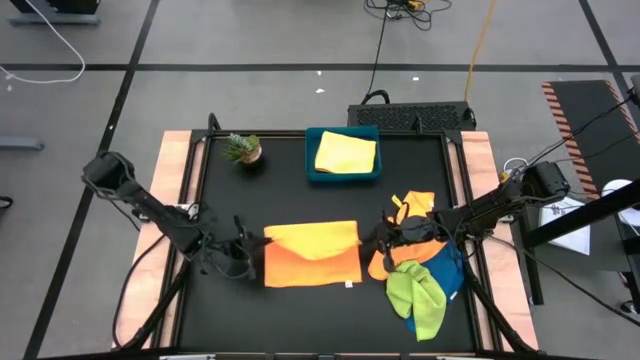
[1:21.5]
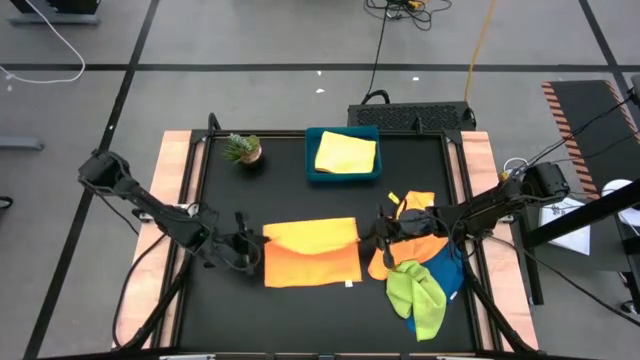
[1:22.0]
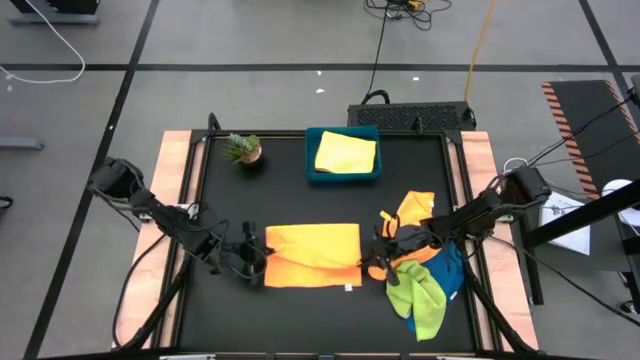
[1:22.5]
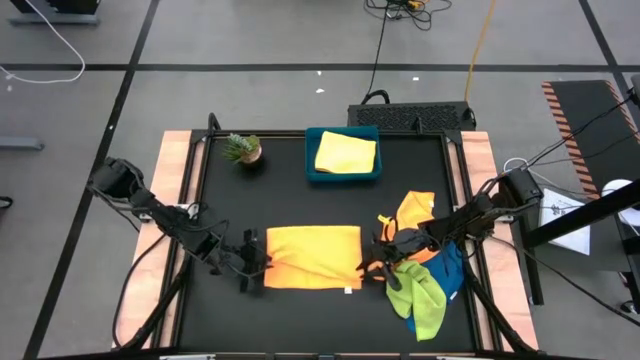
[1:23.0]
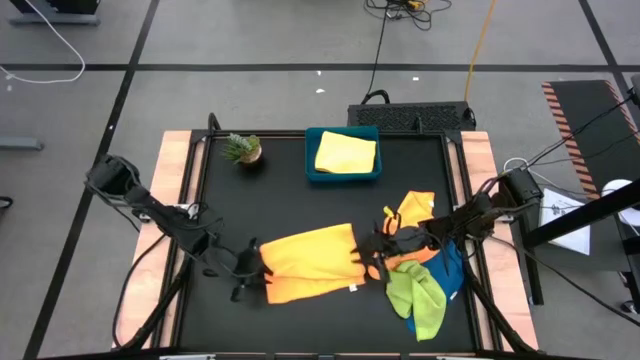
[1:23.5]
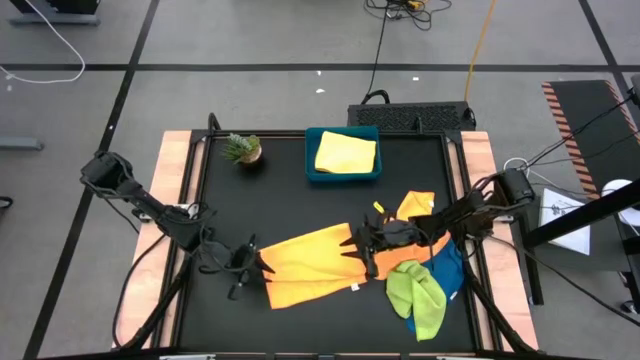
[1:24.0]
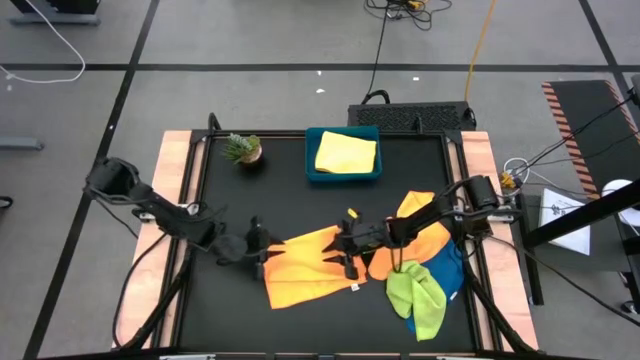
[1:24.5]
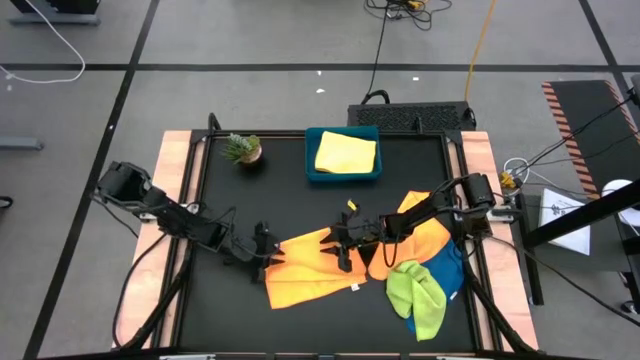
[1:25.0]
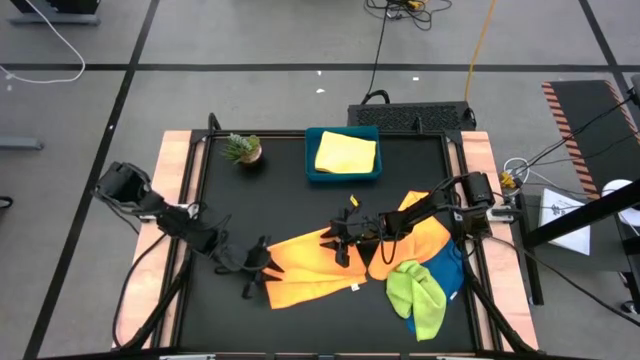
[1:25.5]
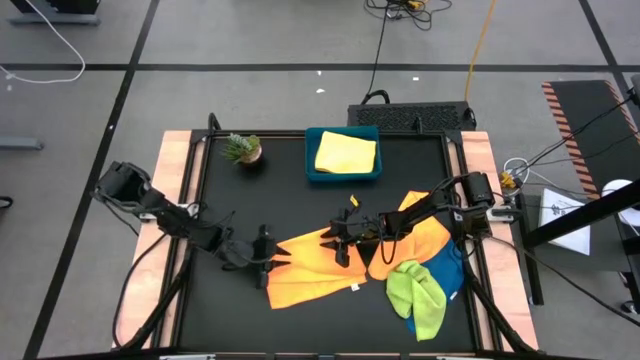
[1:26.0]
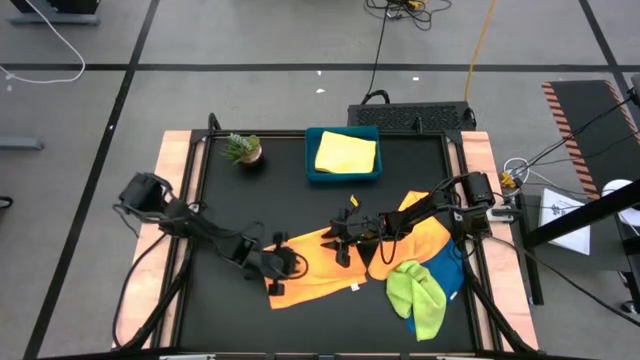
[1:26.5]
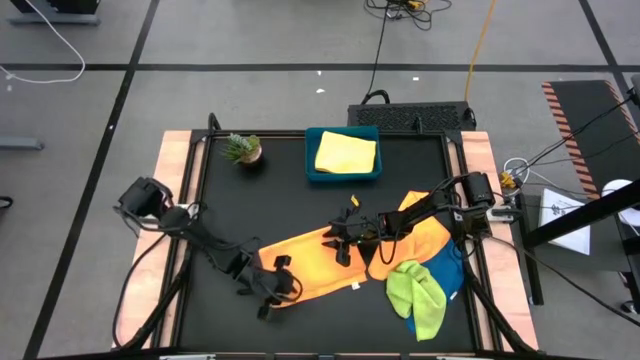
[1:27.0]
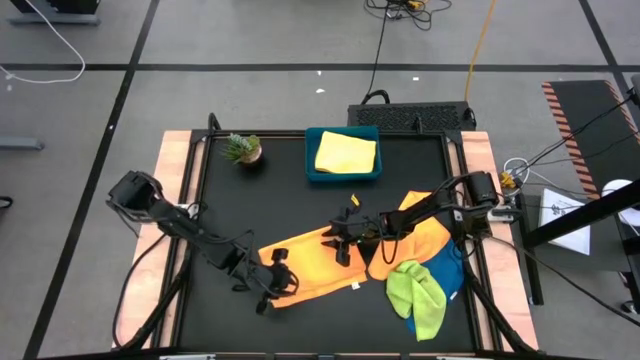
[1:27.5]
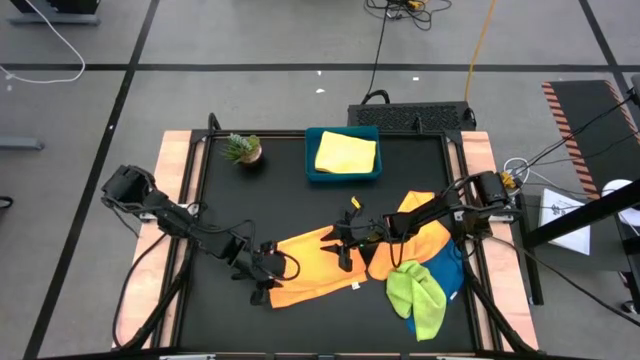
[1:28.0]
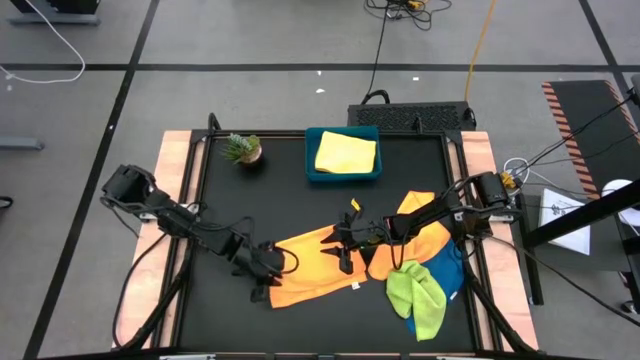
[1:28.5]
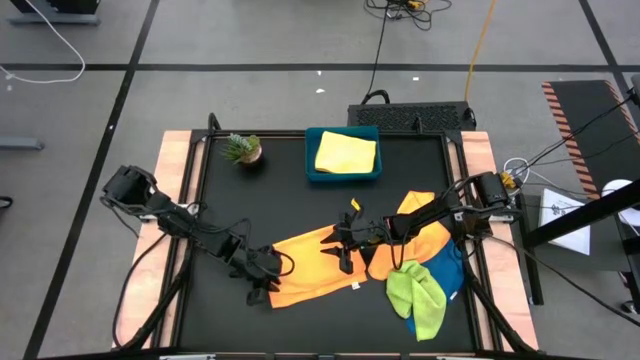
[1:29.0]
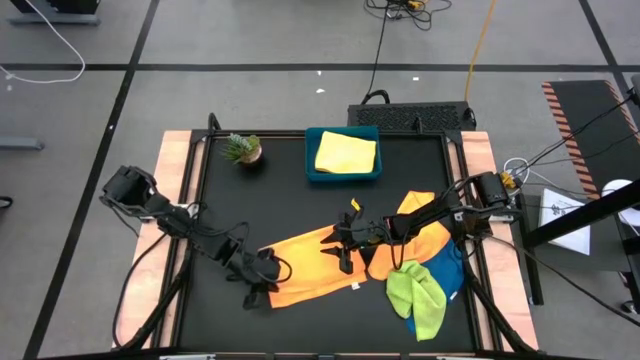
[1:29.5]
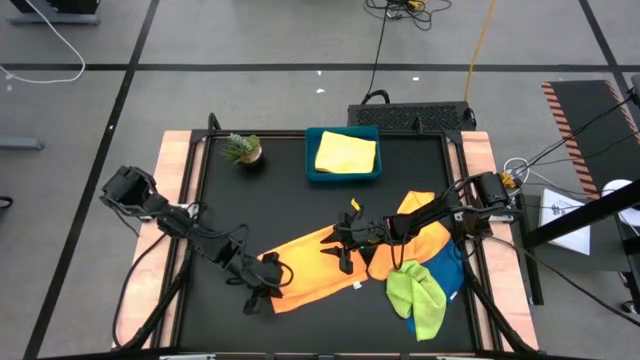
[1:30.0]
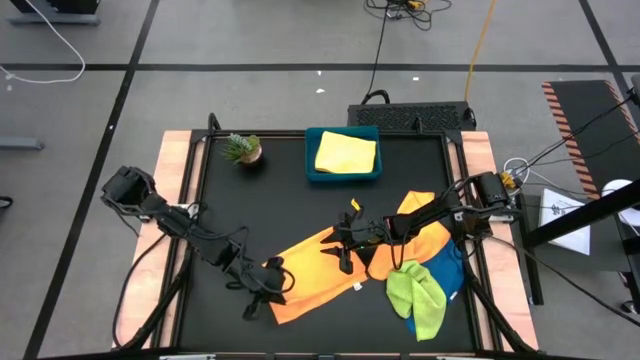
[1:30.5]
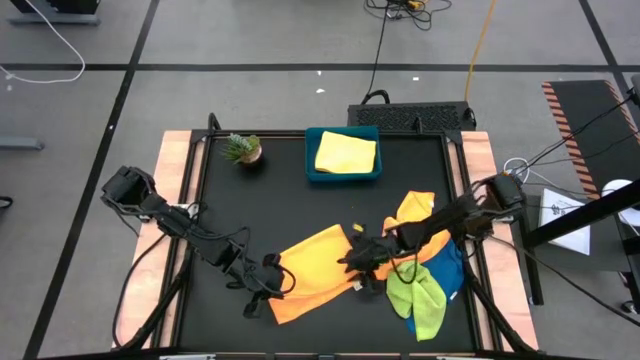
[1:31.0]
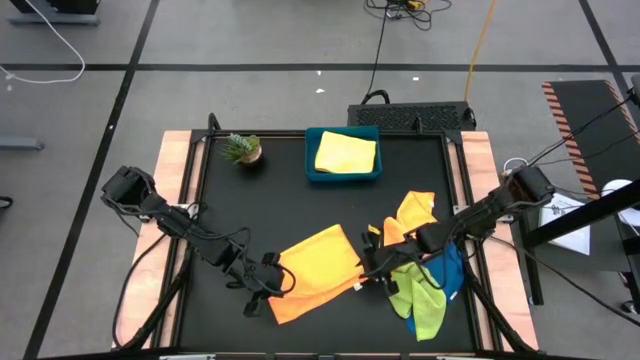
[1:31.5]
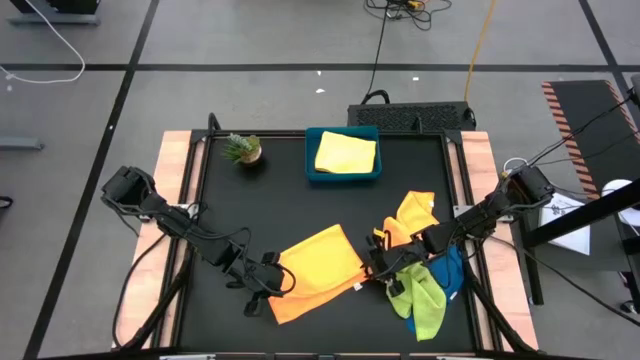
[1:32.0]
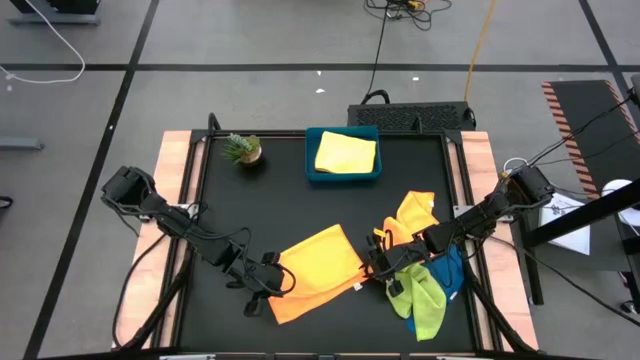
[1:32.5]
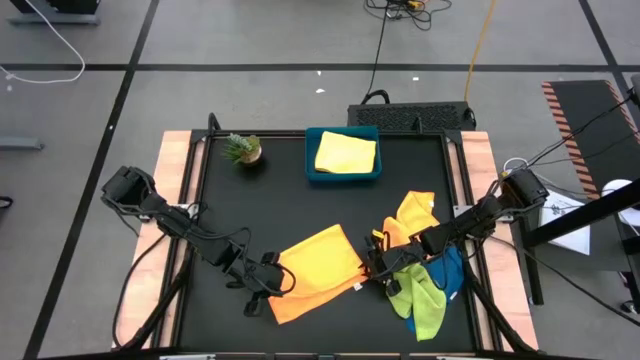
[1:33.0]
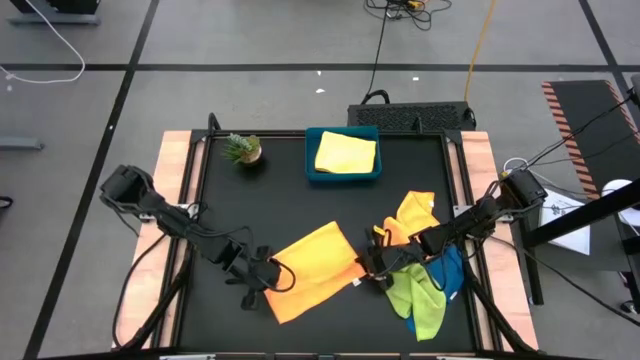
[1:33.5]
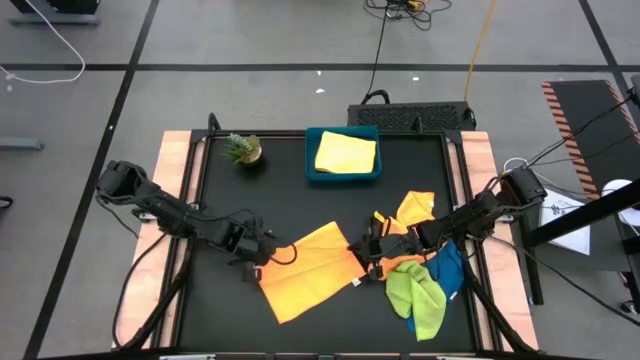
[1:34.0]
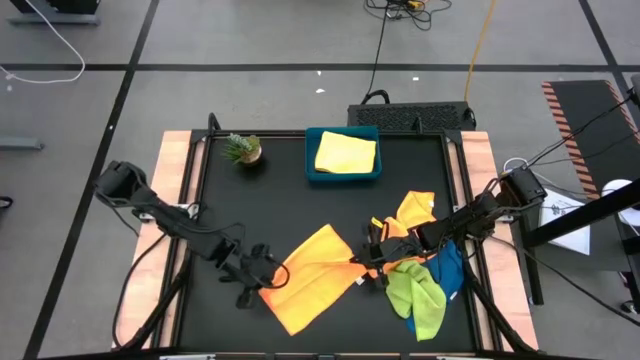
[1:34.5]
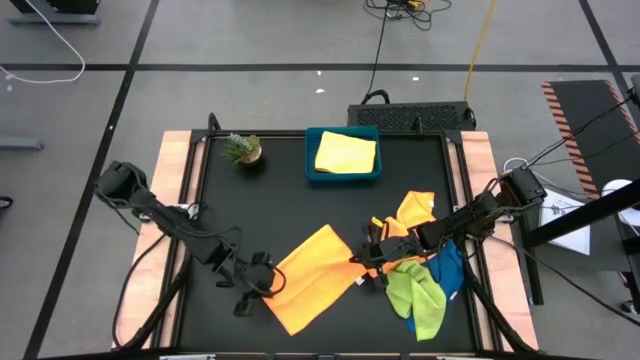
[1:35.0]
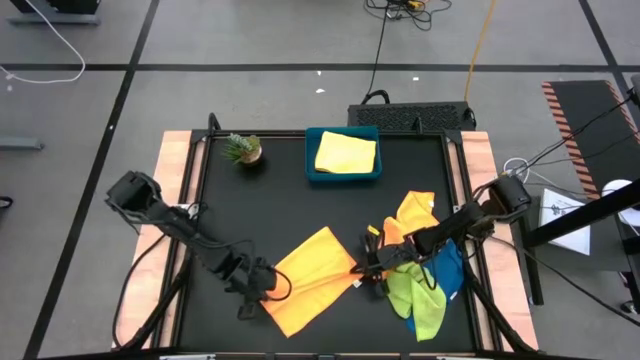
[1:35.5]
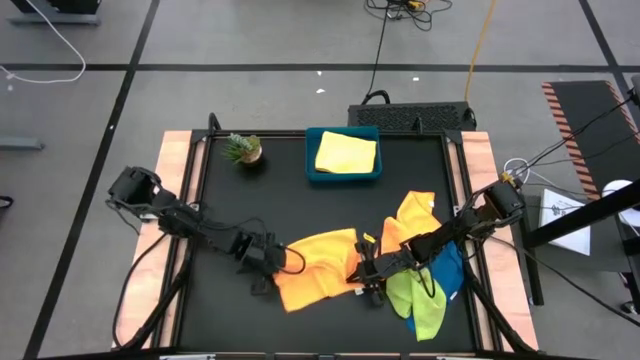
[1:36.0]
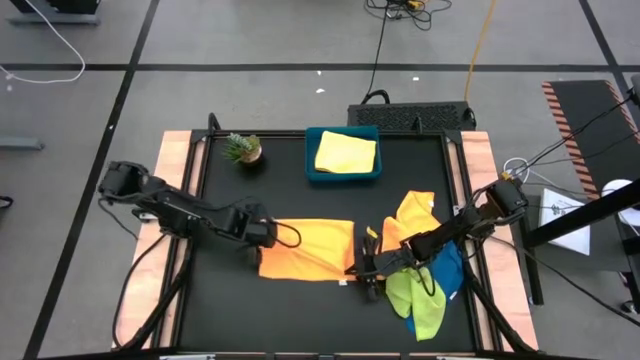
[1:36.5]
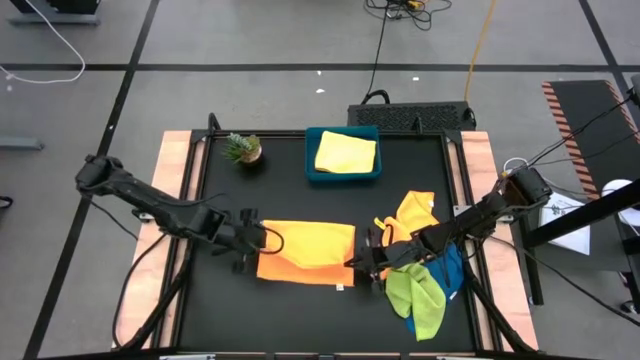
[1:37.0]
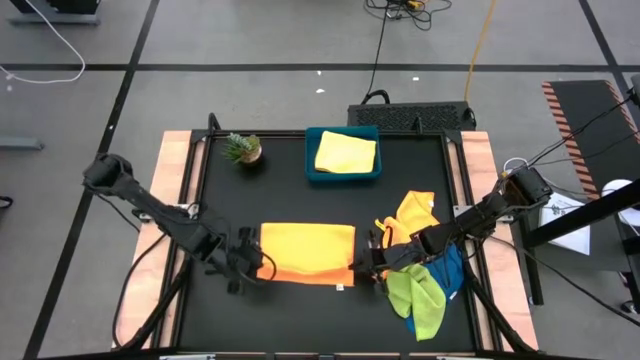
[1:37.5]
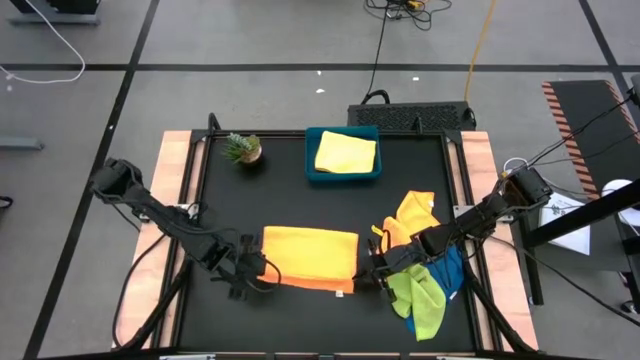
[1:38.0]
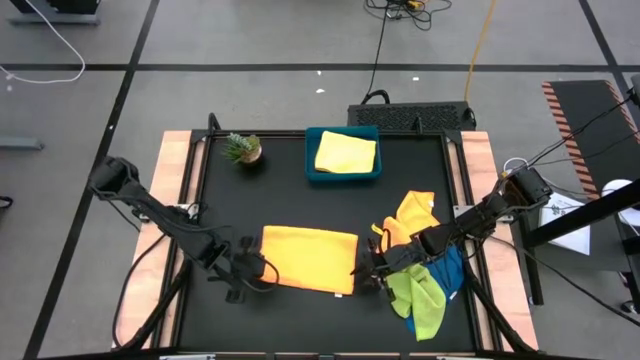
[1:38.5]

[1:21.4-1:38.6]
Task: Fold microfiber towels
Fold the left orange microfiber cloth

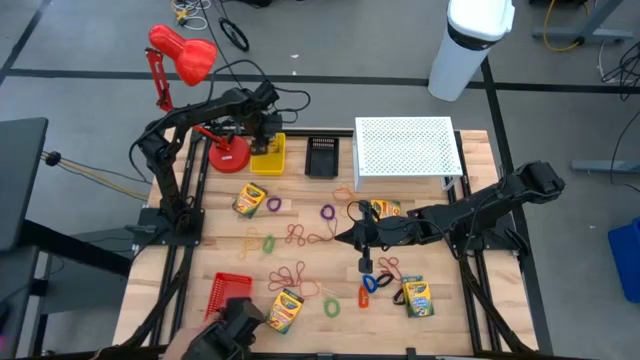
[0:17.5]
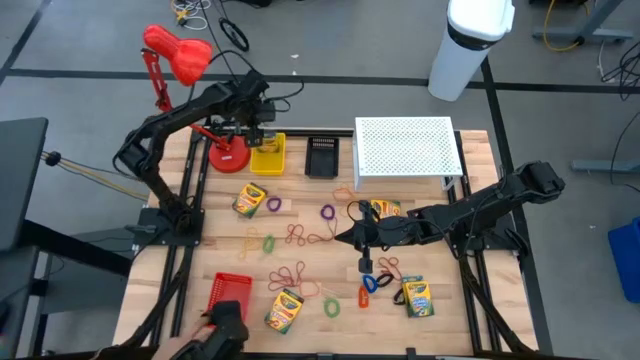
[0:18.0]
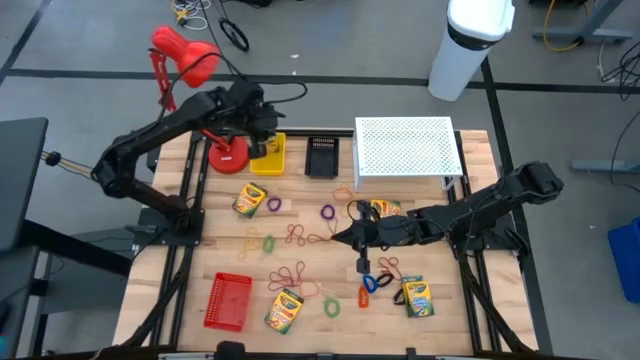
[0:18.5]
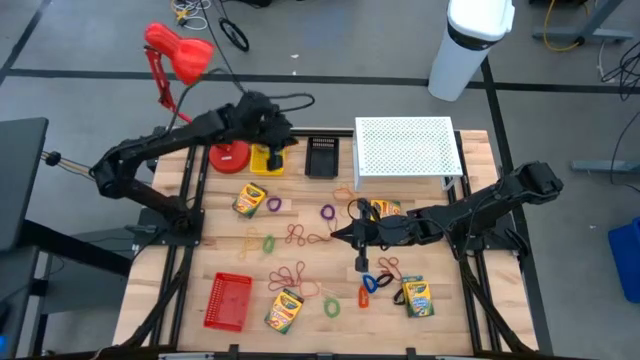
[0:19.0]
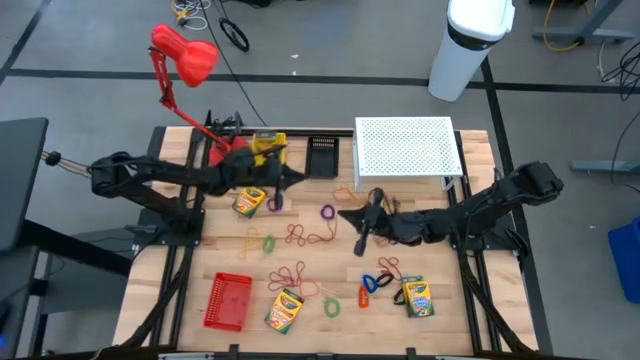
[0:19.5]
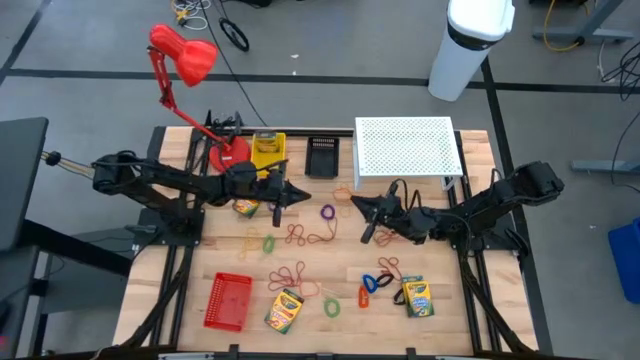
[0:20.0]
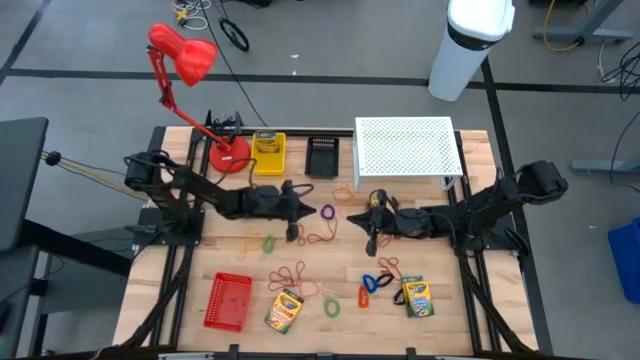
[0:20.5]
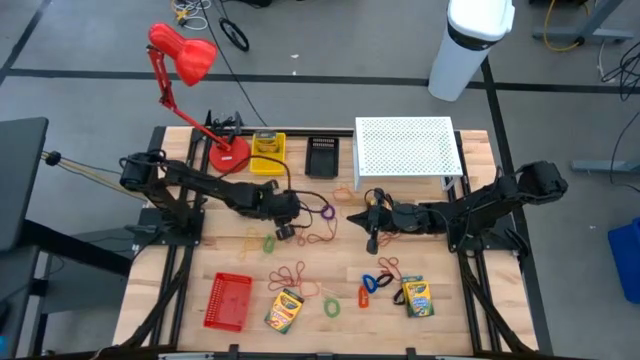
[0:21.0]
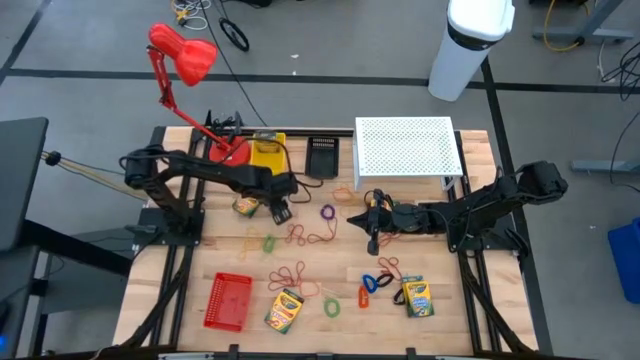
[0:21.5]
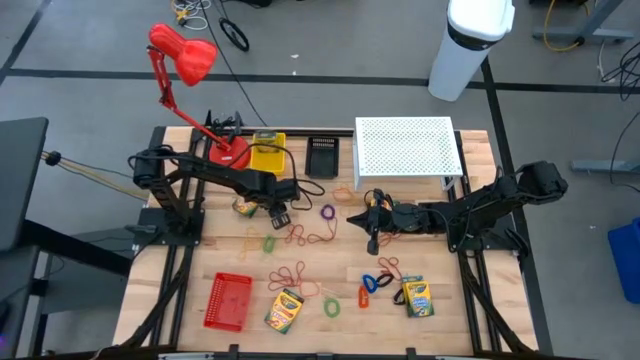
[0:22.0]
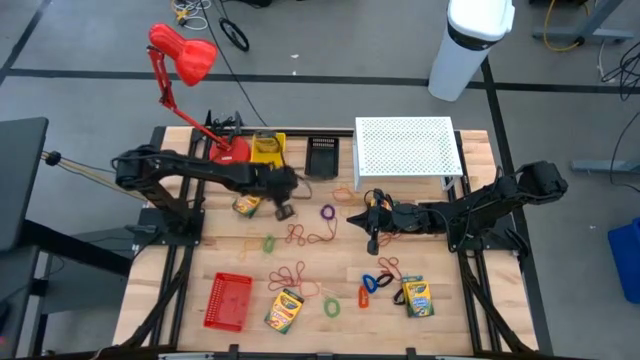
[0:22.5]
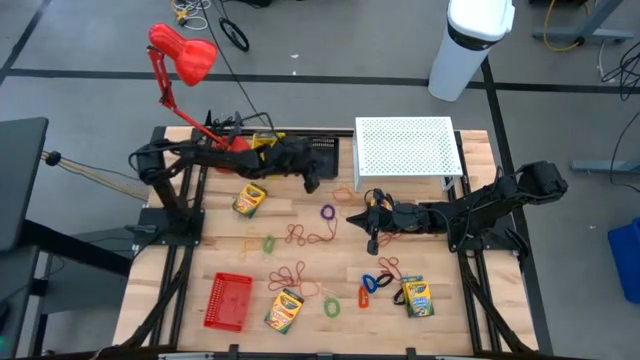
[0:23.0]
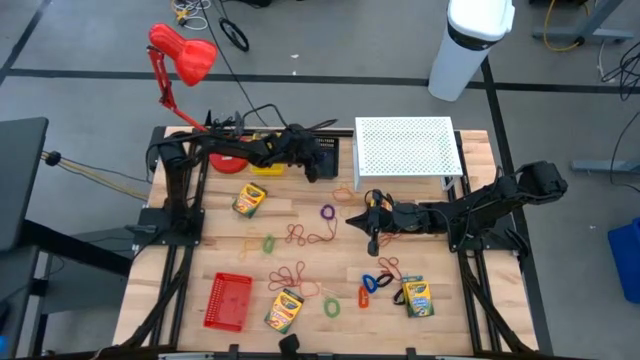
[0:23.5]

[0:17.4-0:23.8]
Task: Pick & Place Office Desk Supplies
Put the violet spiral keychain into the black bin
